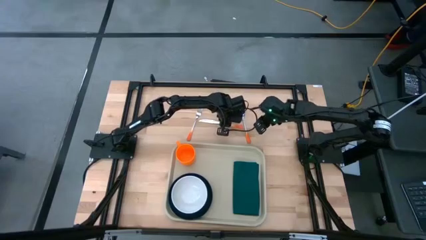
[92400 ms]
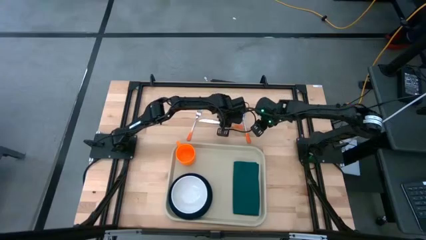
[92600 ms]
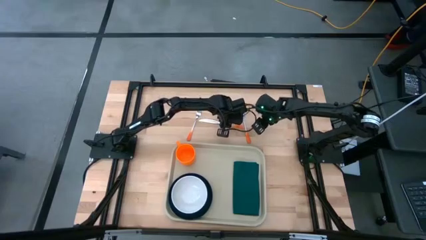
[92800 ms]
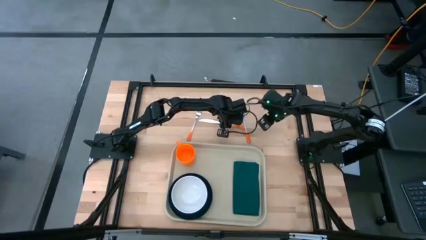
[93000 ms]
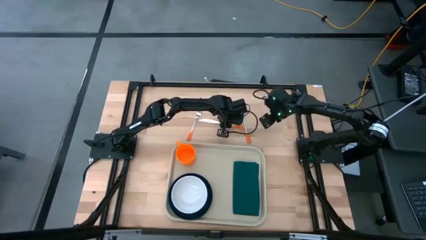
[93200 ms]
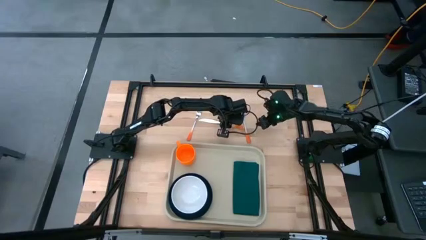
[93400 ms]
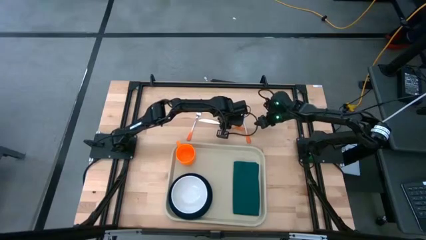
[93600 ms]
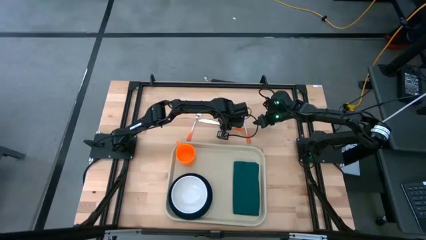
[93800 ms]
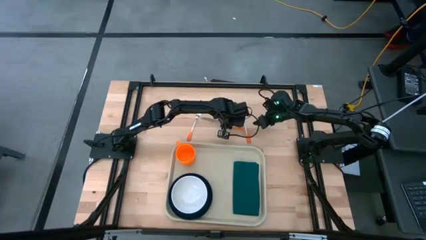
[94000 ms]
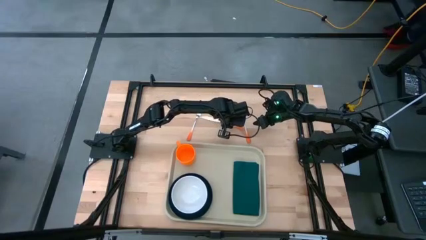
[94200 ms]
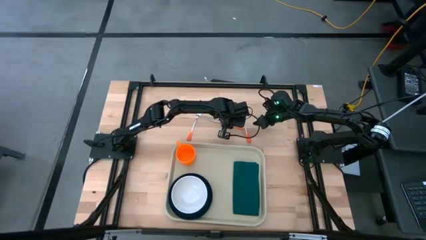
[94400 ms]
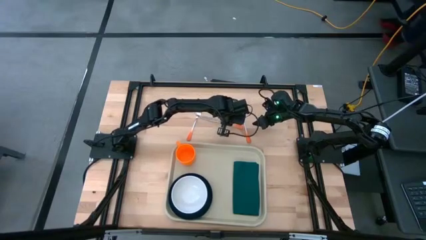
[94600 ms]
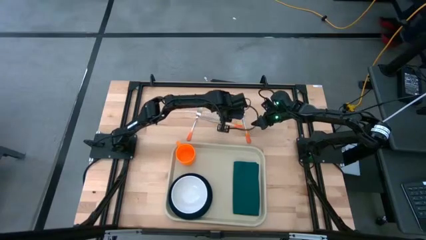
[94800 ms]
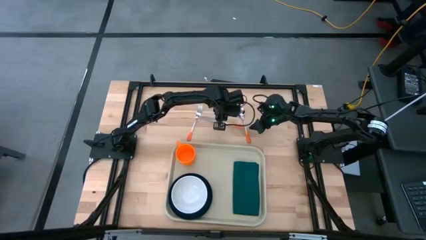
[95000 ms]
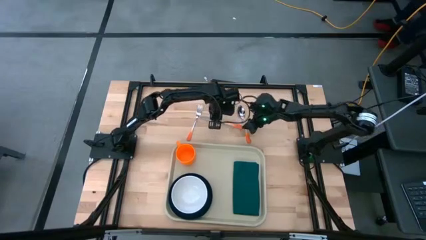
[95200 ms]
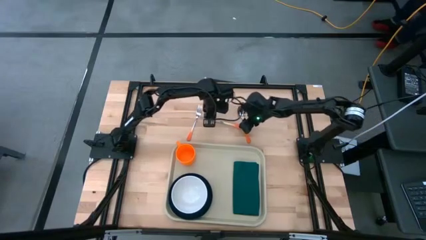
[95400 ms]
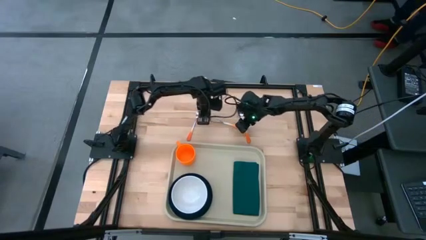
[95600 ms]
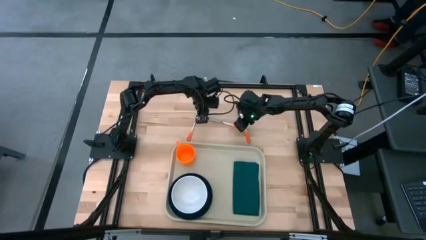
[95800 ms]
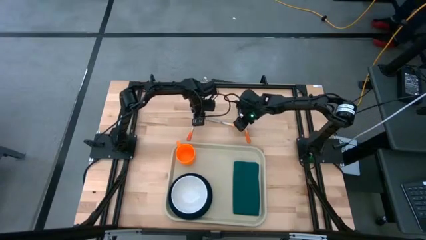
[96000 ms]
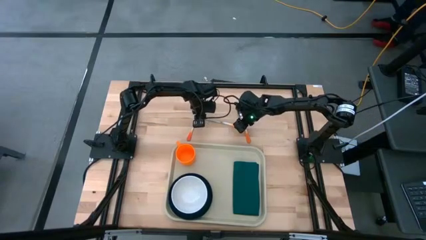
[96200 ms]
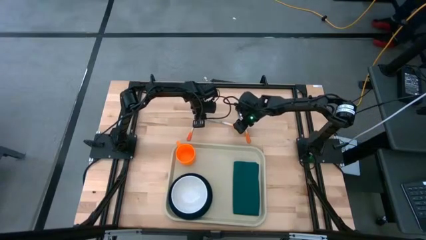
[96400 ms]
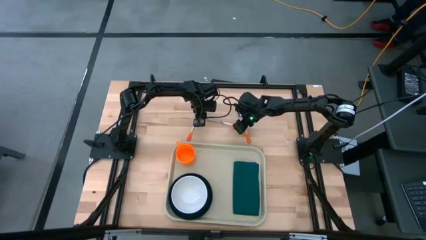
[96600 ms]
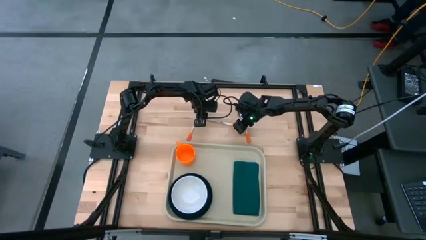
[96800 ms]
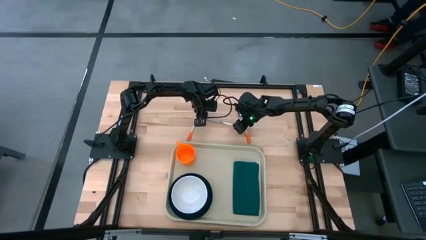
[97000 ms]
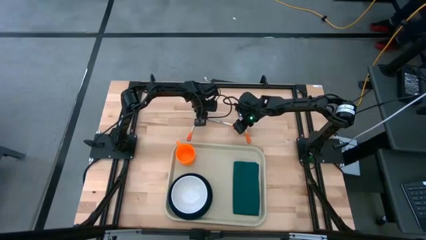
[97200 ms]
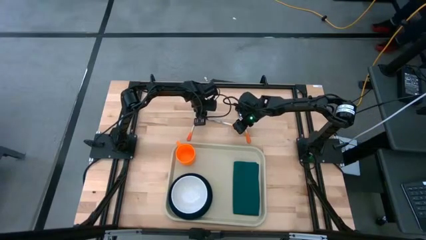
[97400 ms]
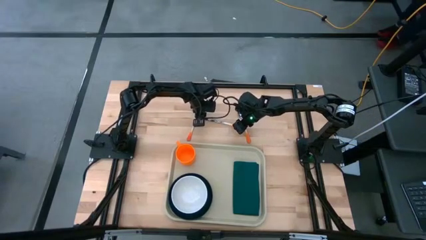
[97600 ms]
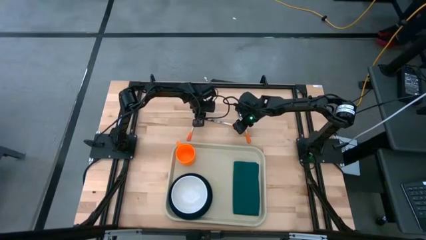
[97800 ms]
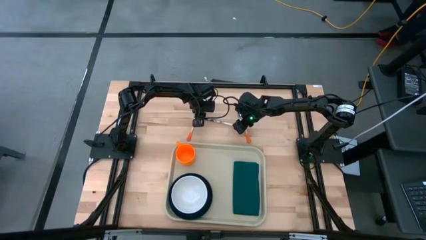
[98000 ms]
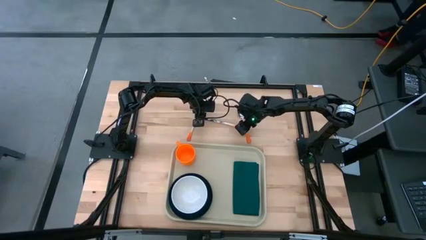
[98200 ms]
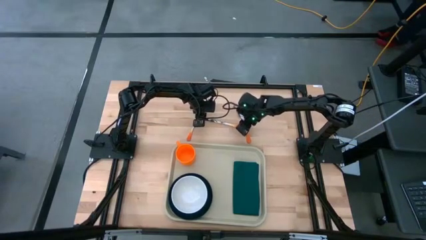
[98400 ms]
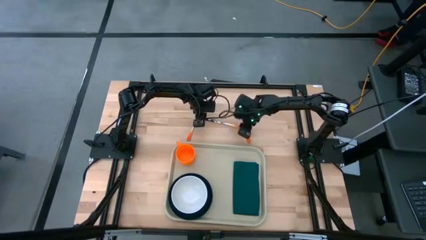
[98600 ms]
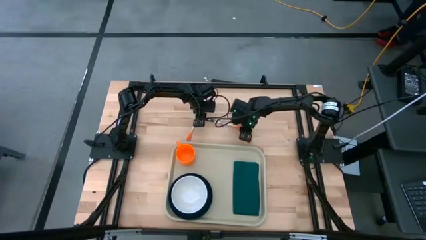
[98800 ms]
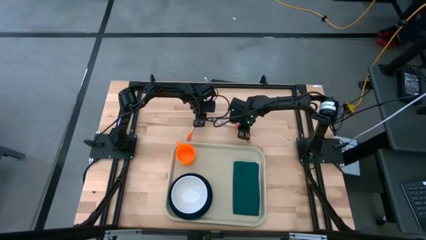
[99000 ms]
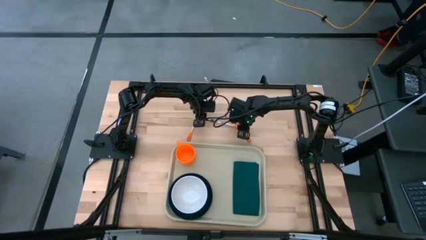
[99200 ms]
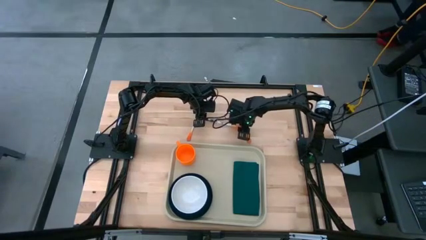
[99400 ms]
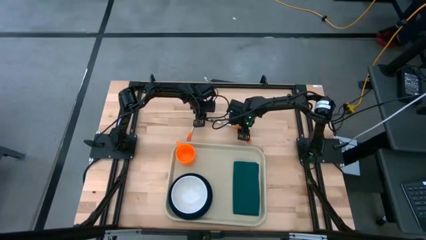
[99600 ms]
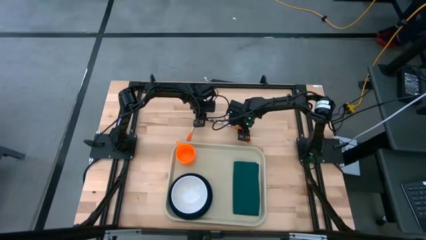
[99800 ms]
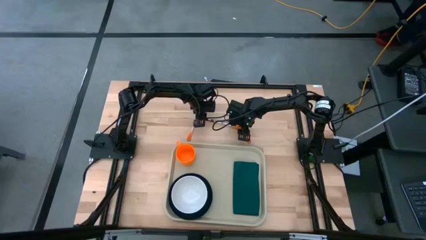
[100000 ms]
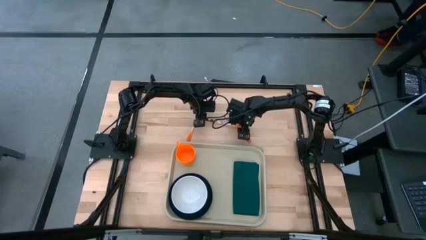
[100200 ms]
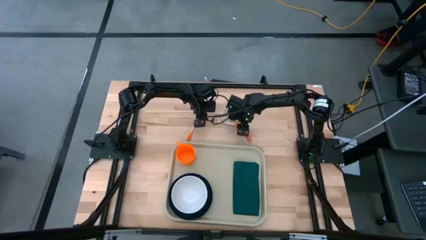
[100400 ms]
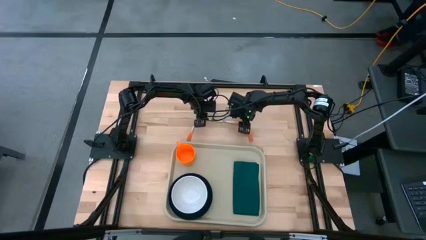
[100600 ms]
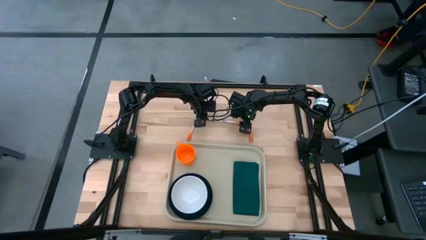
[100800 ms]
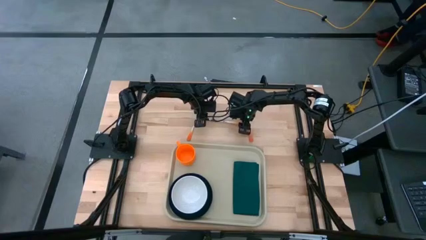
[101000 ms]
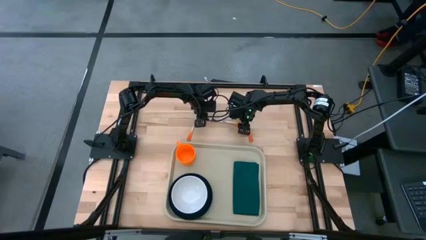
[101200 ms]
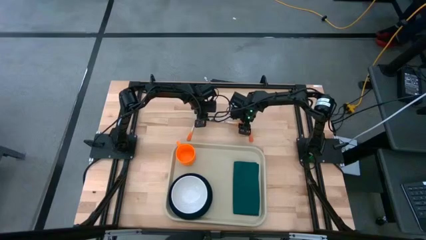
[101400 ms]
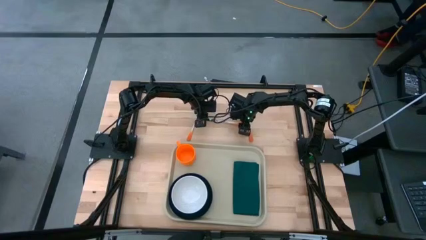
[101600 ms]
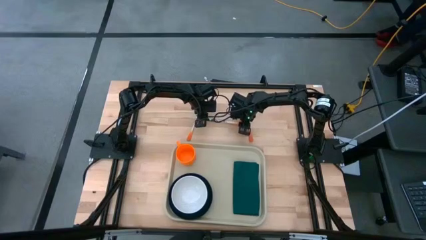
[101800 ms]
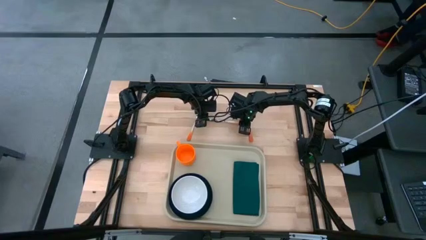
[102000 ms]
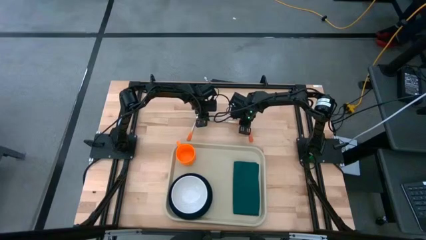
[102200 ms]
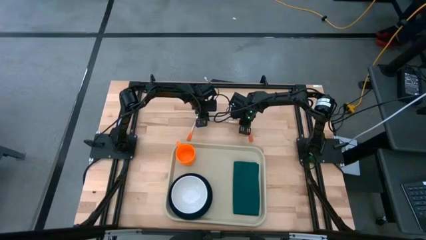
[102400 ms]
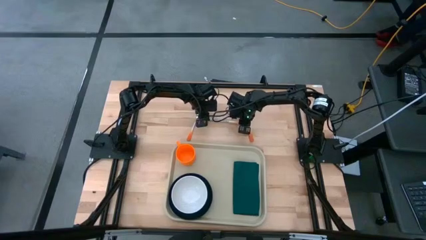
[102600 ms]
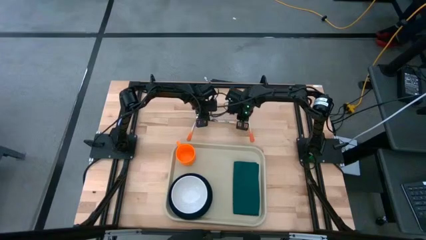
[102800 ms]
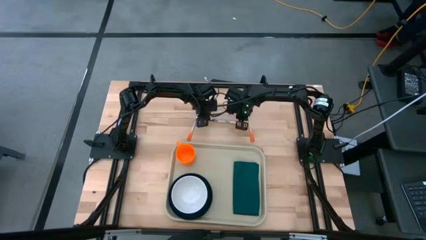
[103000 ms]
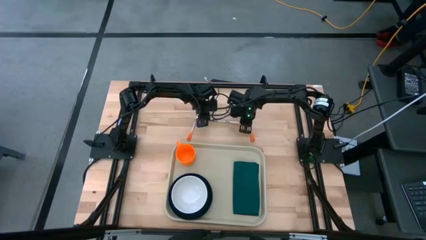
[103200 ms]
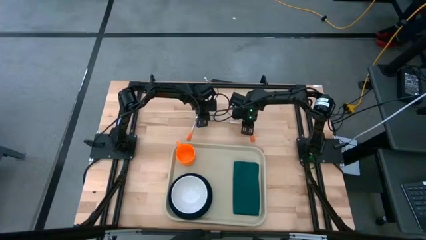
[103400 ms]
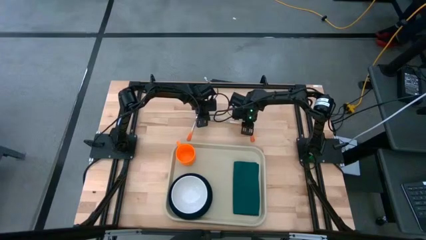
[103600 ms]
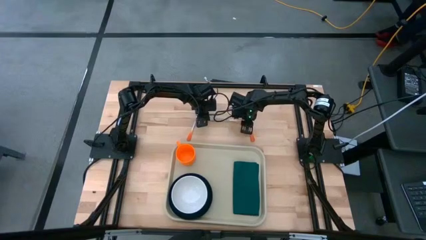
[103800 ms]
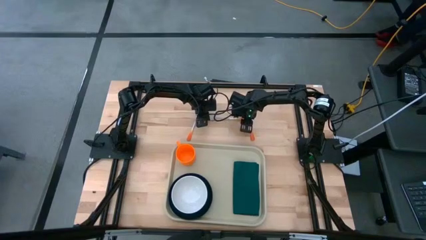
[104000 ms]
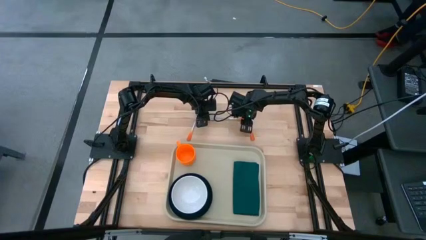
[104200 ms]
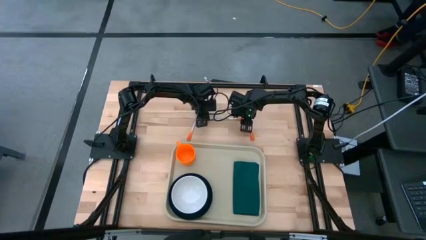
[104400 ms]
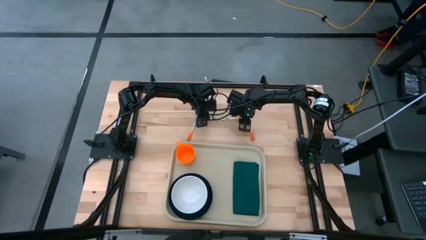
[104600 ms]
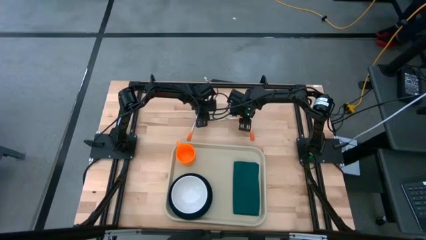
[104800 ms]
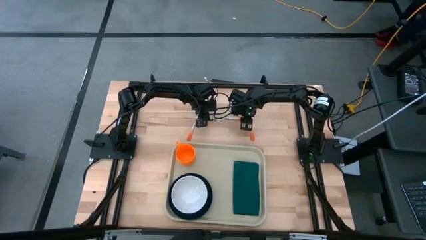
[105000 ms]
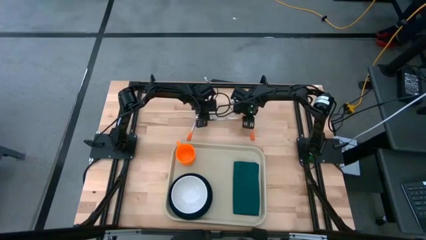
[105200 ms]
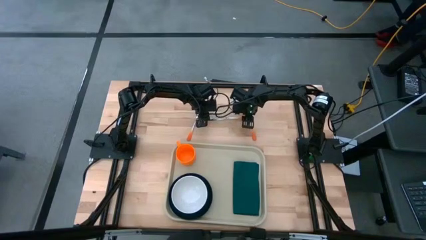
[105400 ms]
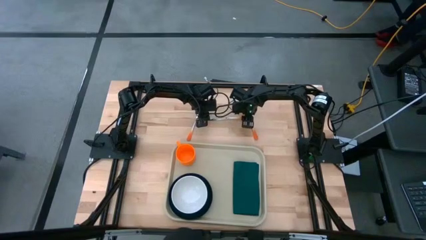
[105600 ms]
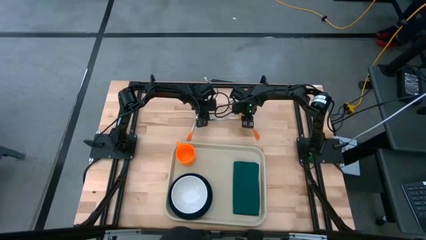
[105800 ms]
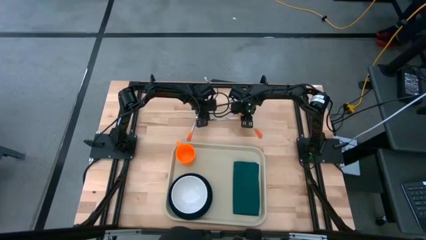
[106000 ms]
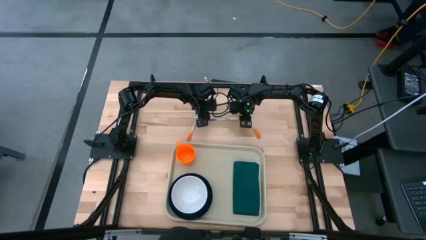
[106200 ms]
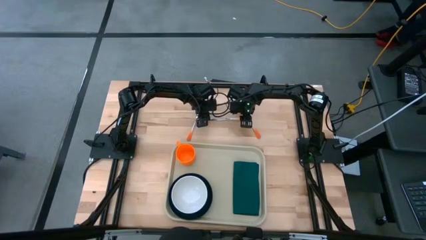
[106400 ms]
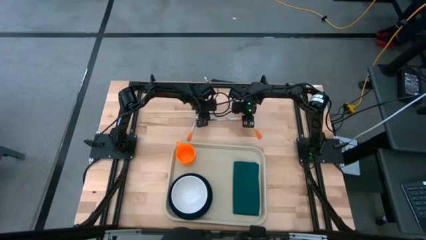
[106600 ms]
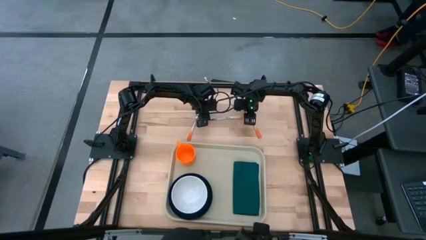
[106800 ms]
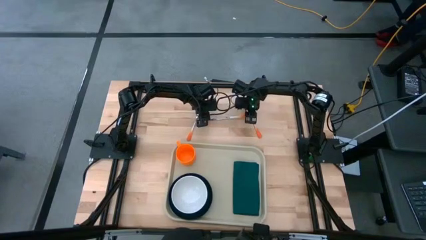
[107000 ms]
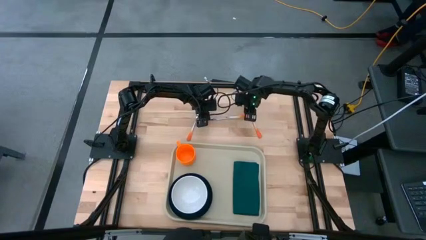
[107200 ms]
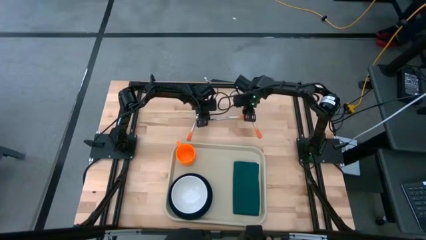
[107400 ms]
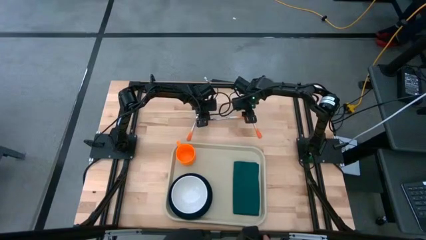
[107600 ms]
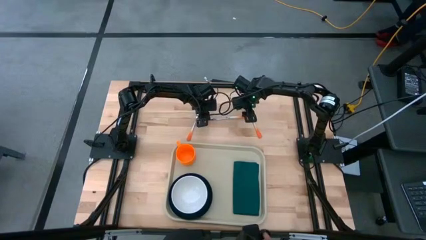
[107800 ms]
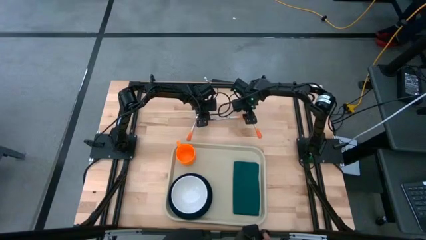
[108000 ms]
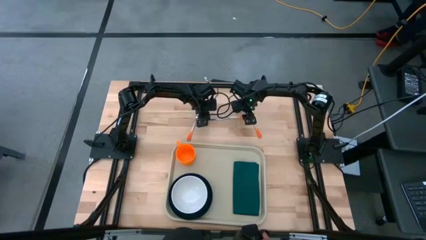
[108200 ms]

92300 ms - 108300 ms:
Task: Set up tray
Put the knife on the napkin
